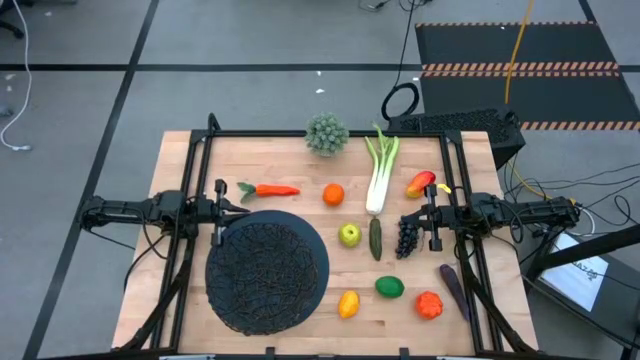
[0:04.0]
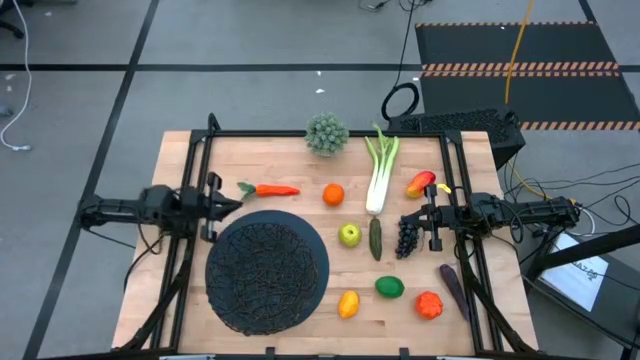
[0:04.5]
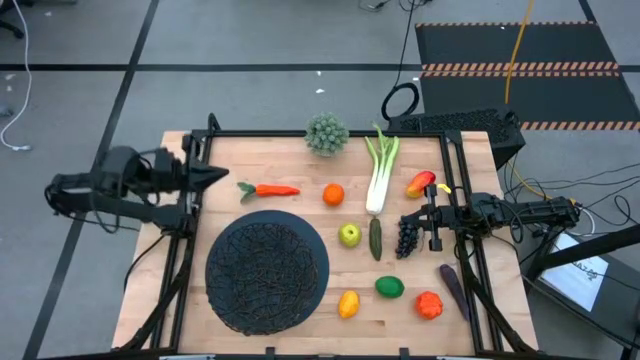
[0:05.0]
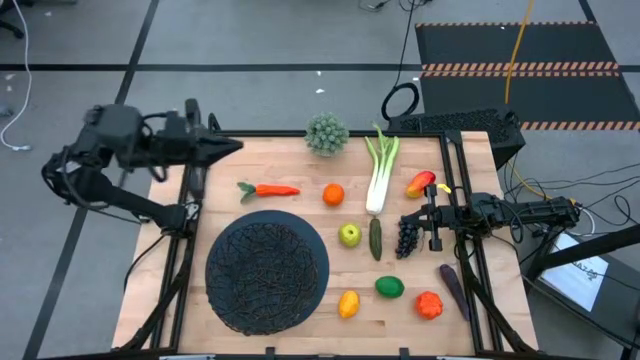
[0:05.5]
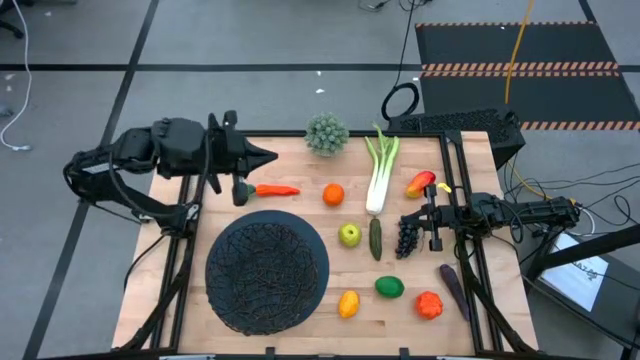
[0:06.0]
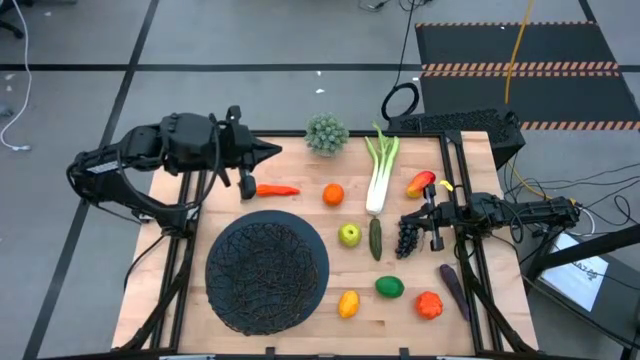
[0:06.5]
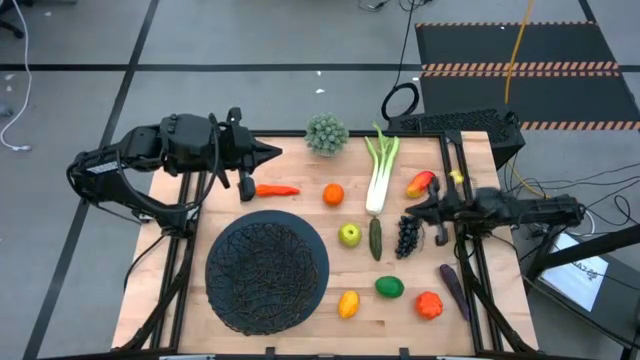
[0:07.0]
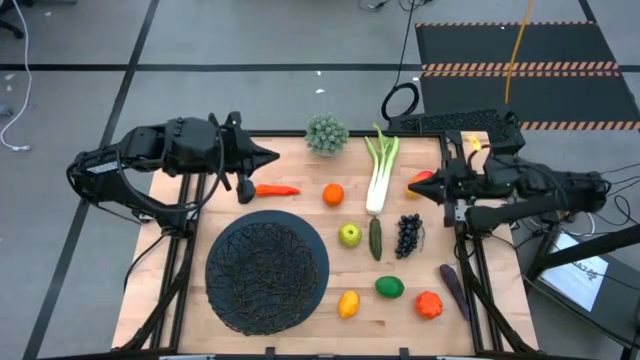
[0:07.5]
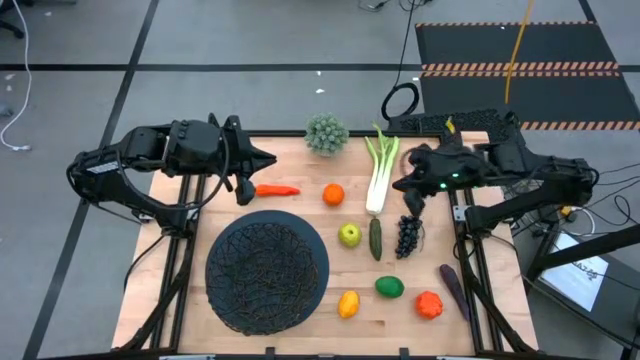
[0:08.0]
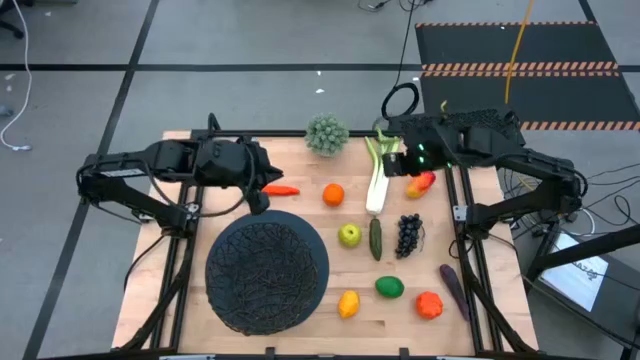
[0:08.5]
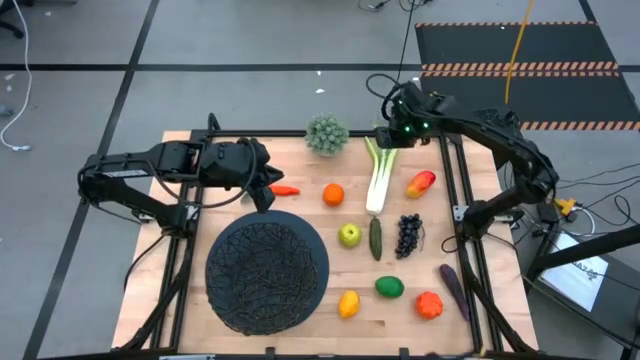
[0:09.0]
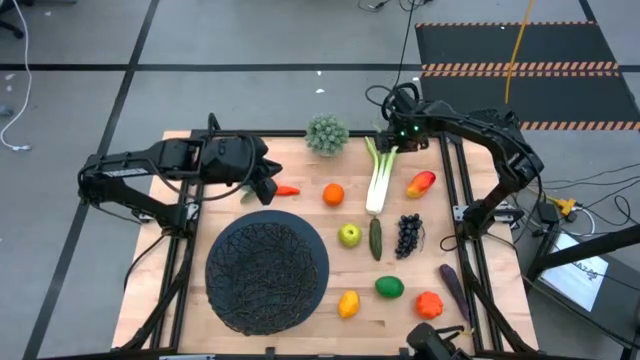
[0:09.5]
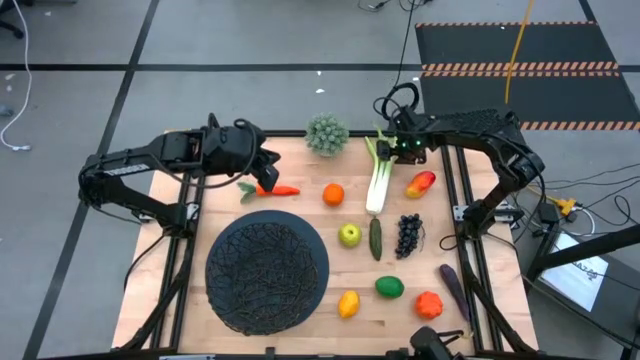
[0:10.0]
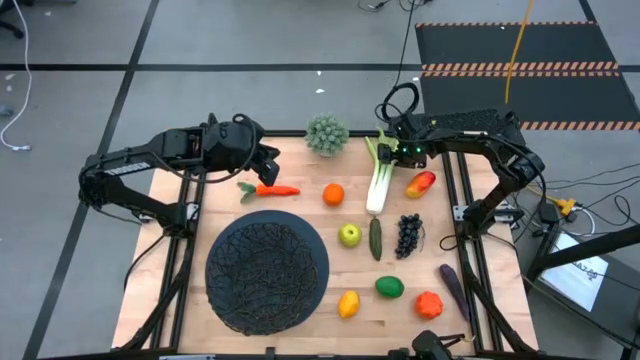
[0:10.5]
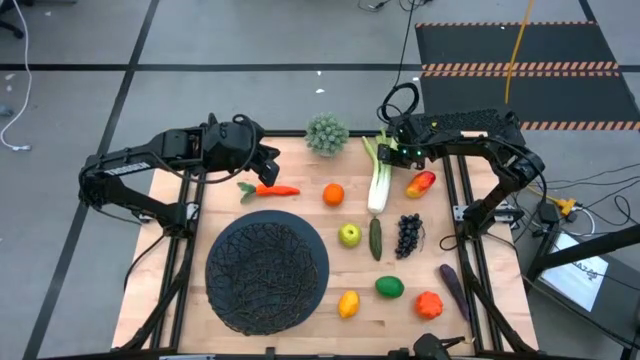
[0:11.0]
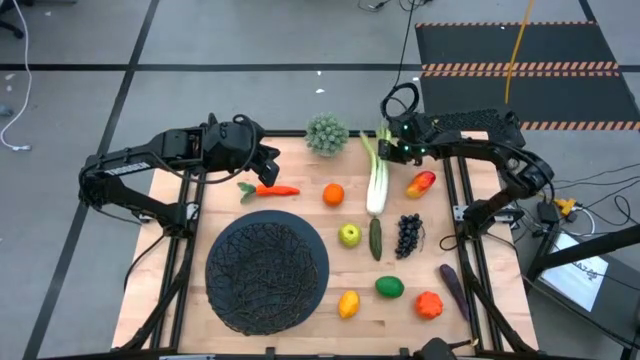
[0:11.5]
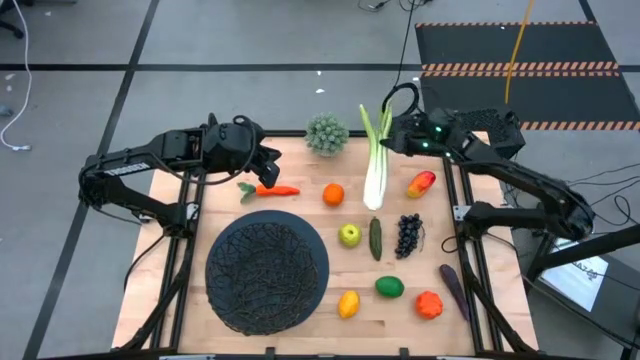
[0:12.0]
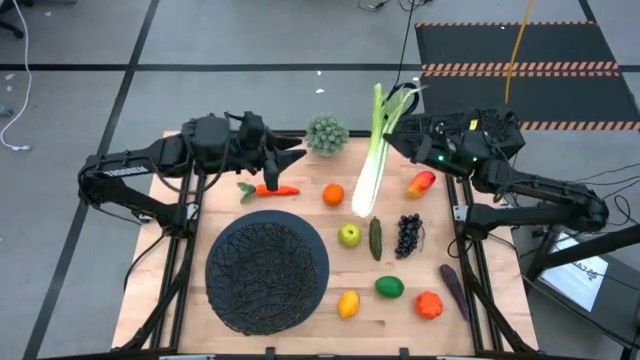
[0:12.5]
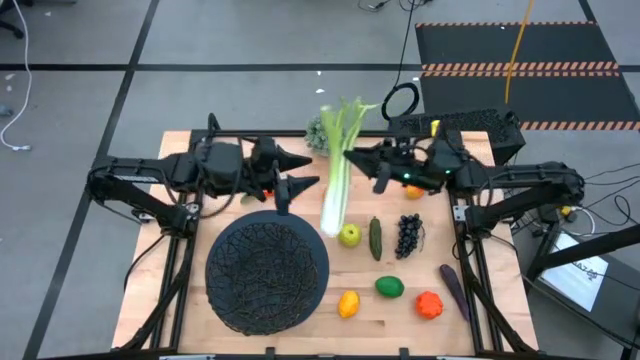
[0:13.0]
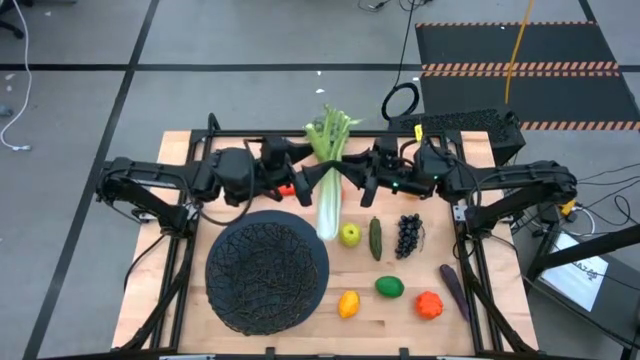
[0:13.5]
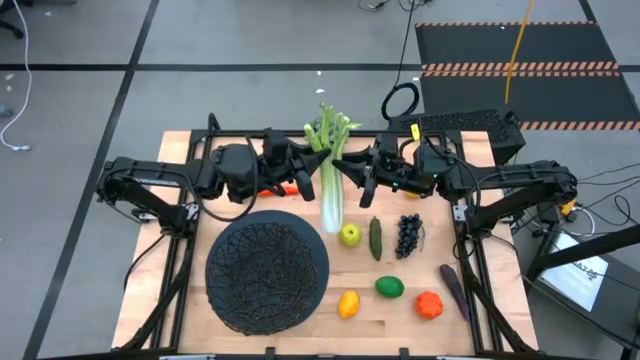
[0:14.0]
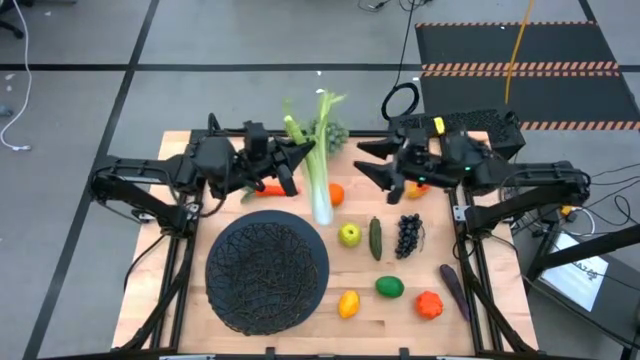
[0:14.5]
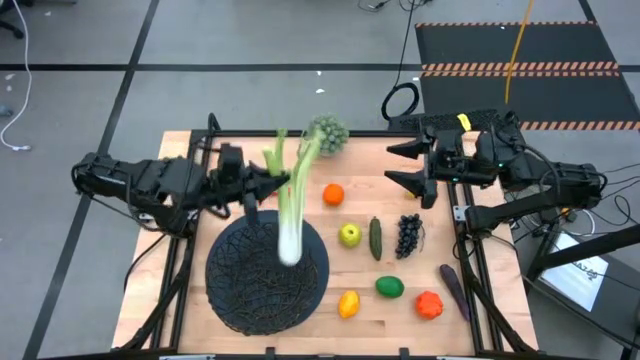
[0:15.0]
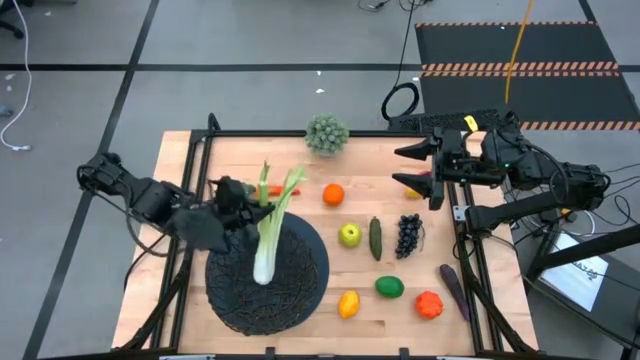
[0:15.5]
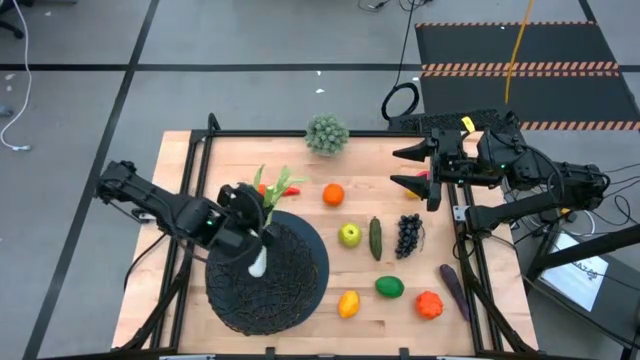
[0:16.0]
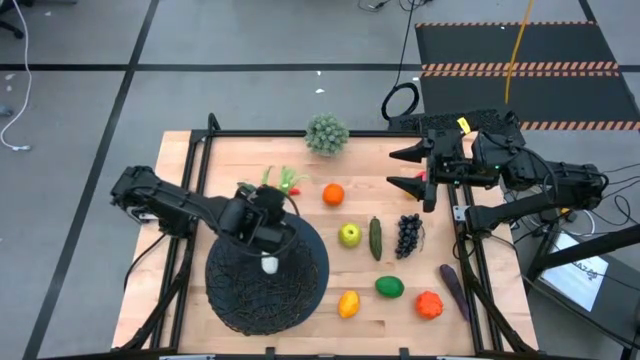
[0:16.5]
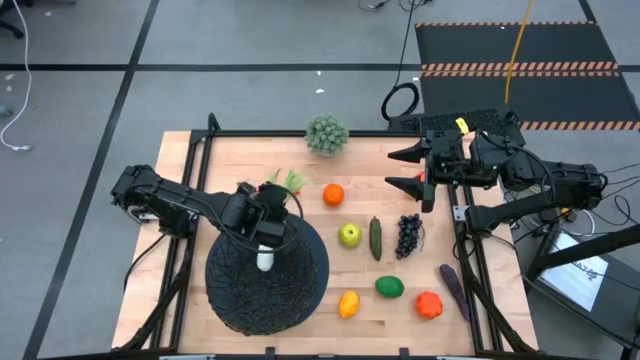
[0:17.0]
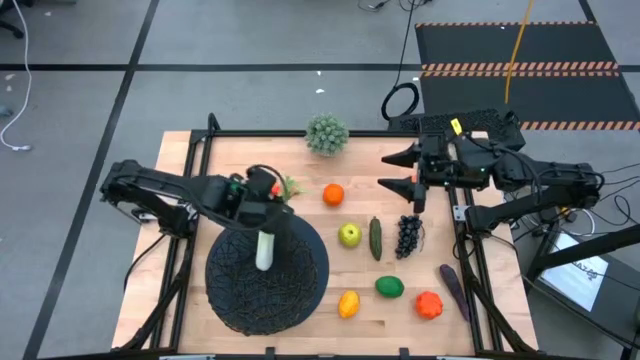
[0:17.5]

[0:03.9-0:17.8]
Task: Build produce basket
Put the green celery into the black wire basket

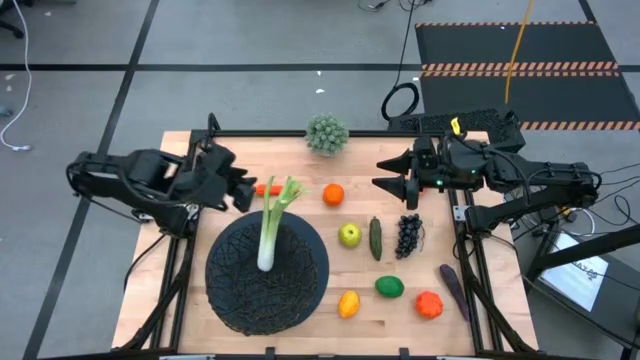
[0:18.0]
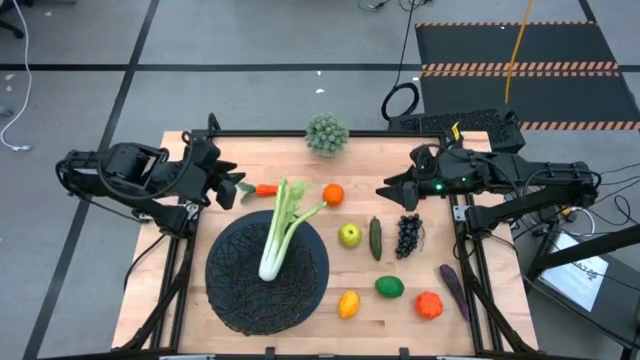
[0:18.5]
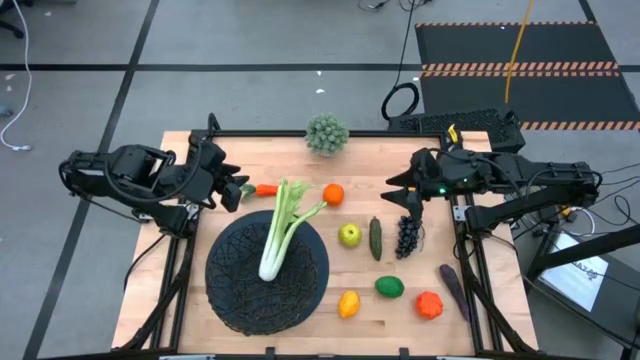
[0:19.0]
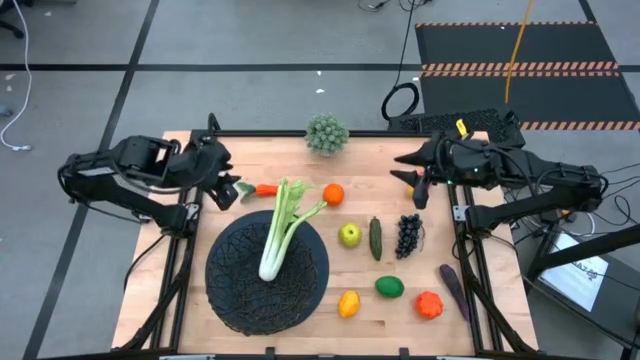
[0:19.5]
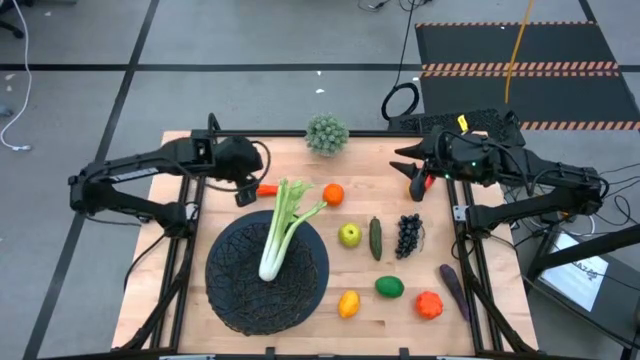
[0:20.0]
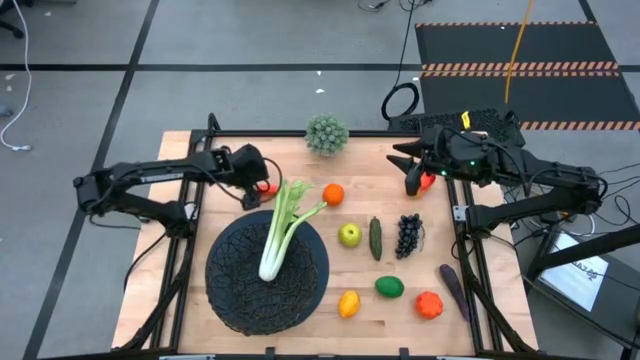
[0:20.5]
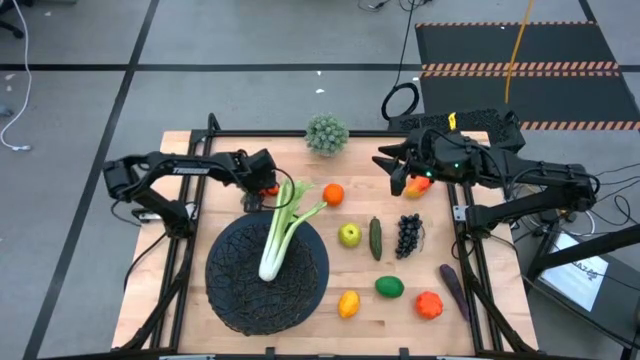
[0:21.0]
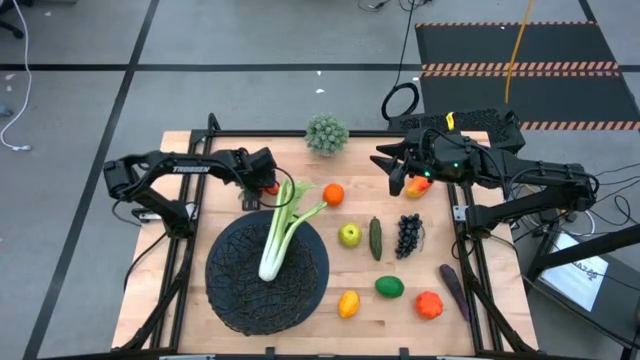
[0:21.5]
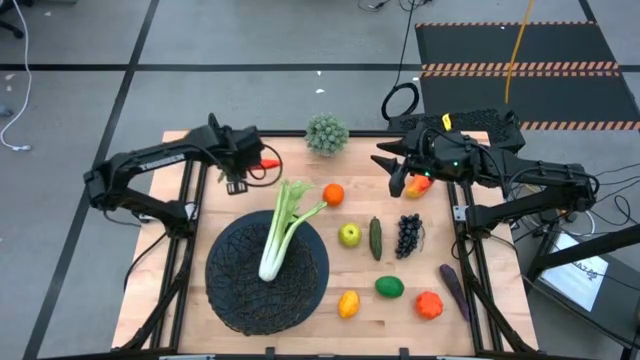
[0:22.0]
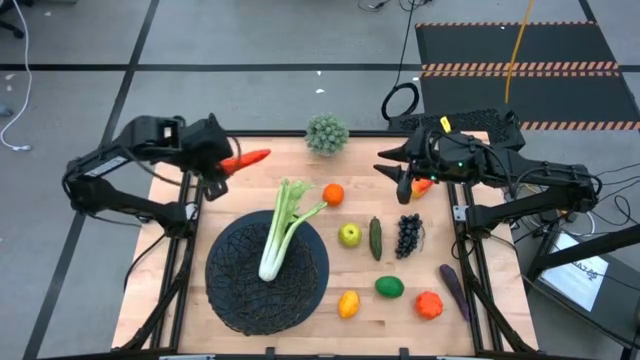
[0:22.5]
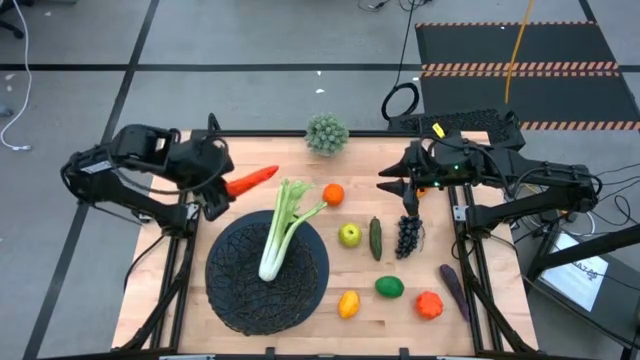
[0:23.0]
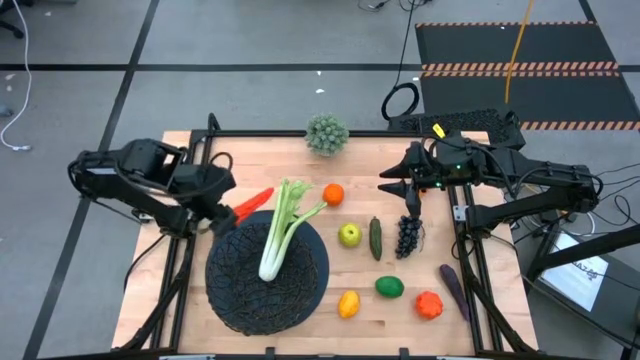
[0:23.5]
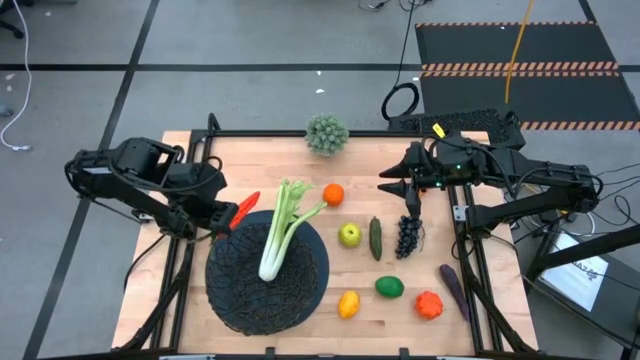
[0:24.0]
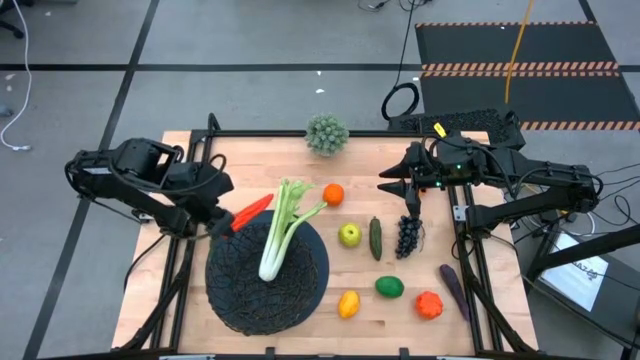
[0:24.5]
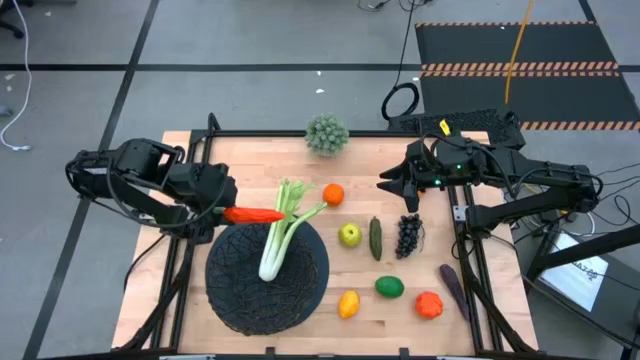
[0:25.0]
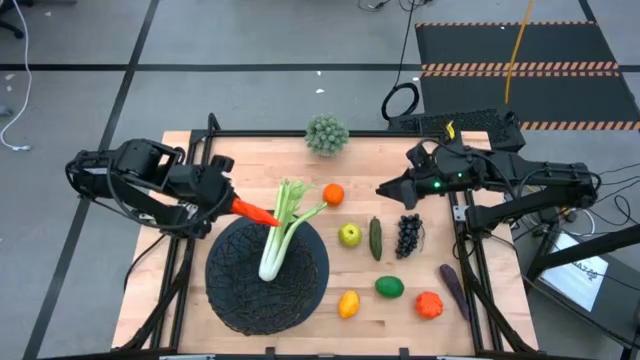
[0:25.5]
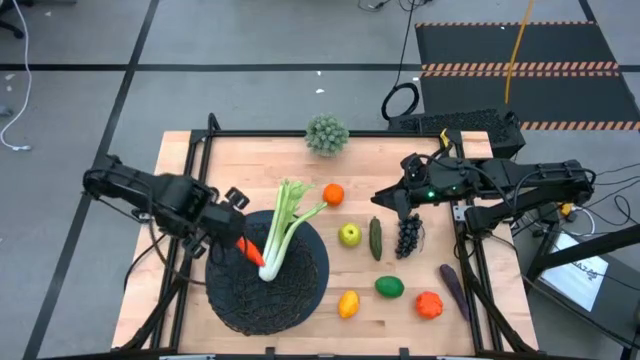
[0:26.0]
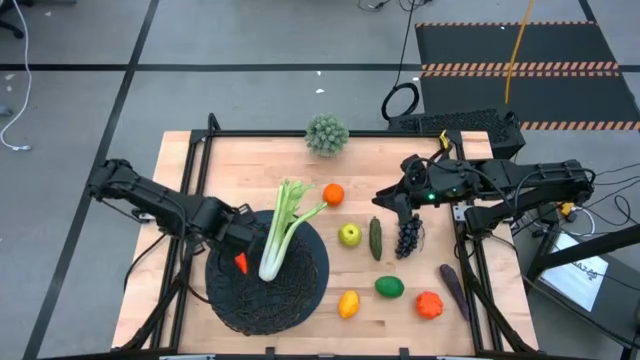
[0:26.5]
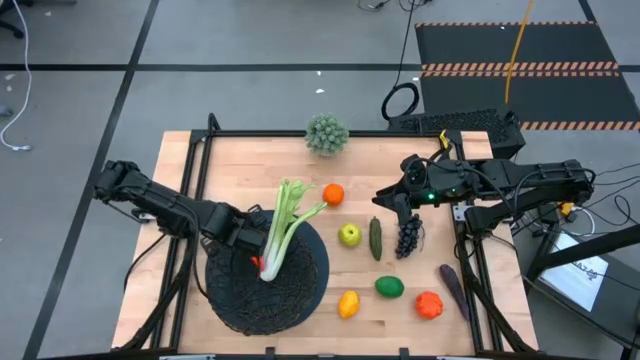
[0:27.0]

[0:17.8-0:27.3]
Put the orange carrot into the black wire basket
